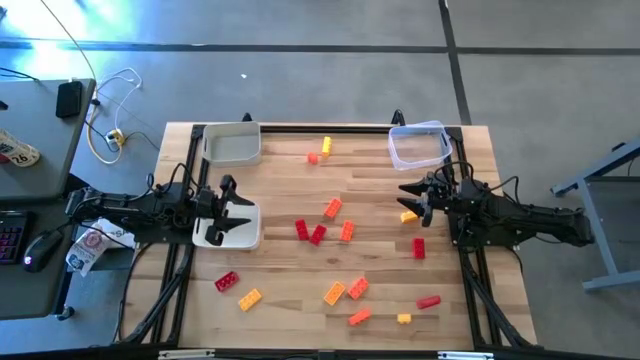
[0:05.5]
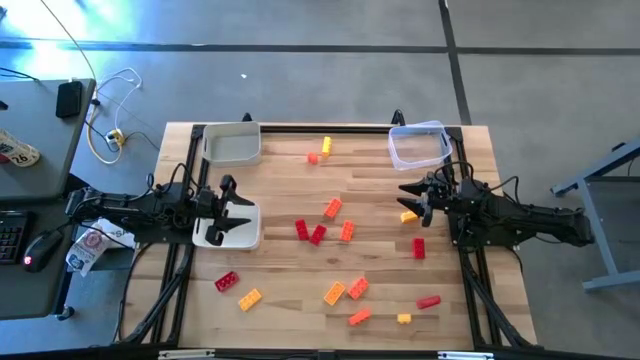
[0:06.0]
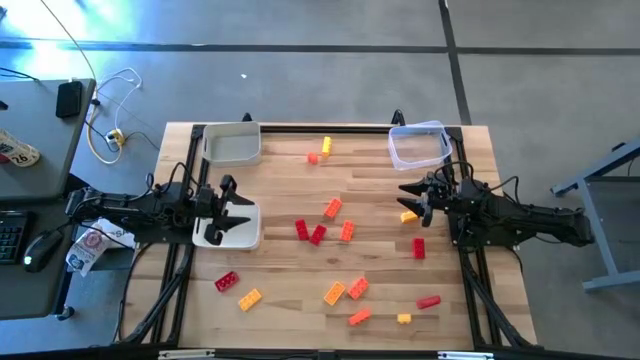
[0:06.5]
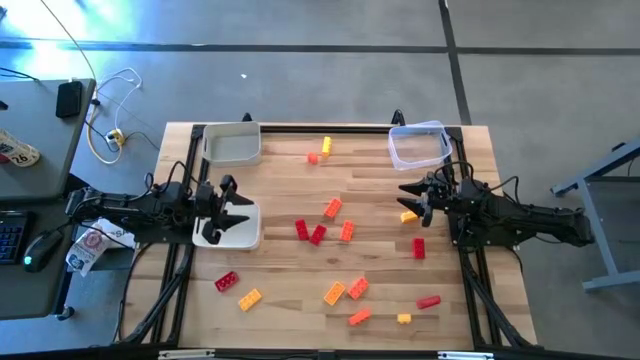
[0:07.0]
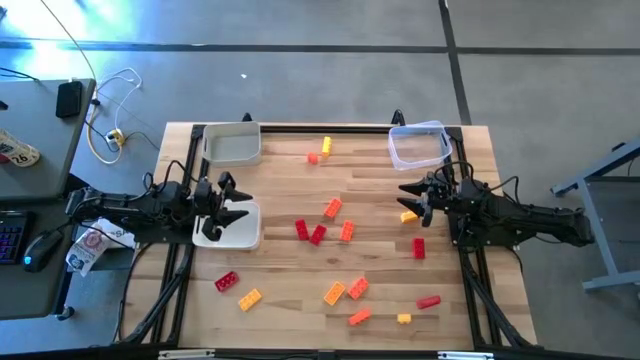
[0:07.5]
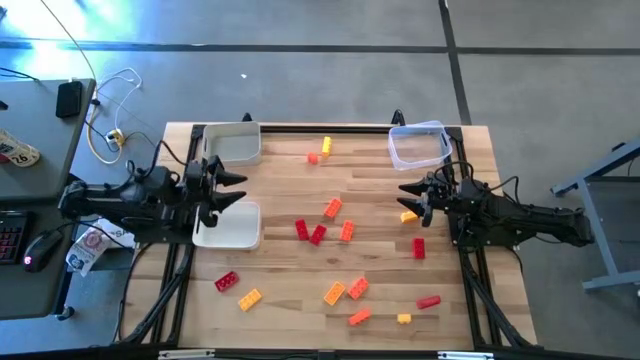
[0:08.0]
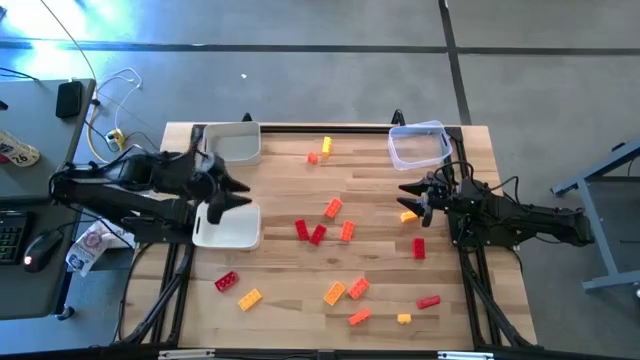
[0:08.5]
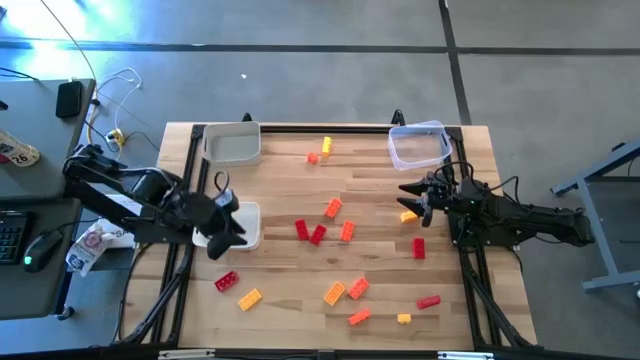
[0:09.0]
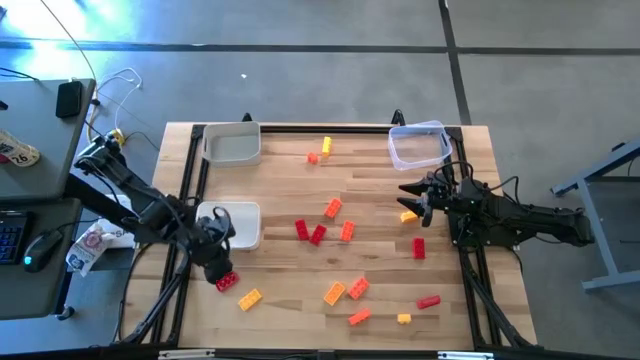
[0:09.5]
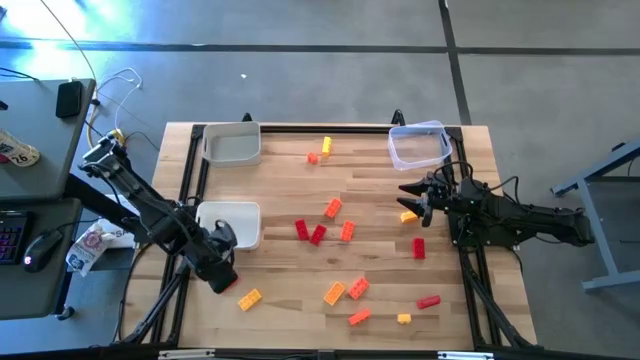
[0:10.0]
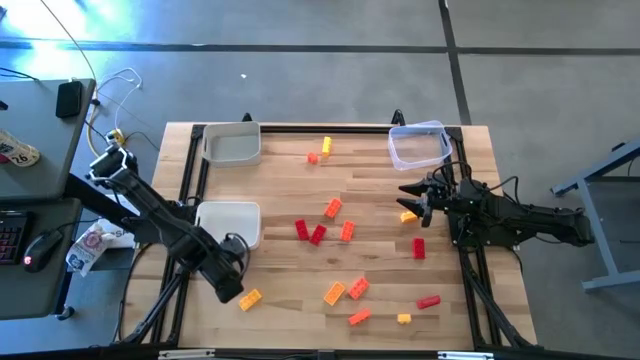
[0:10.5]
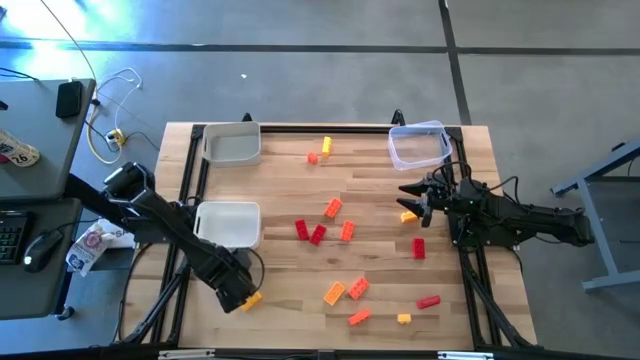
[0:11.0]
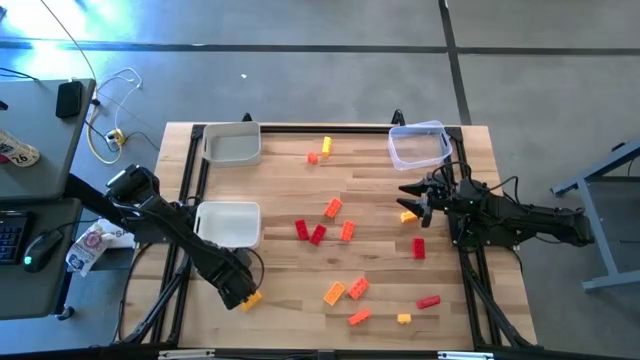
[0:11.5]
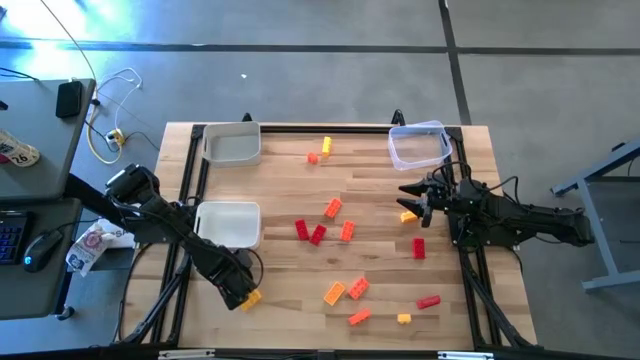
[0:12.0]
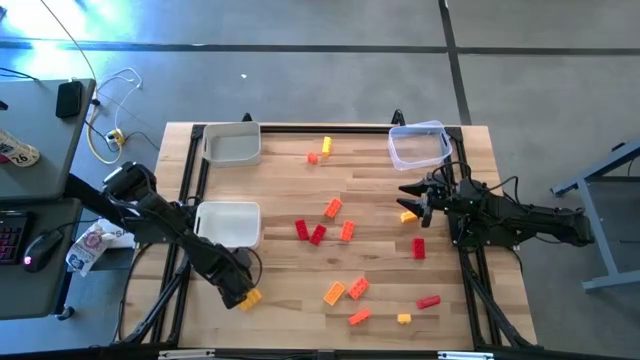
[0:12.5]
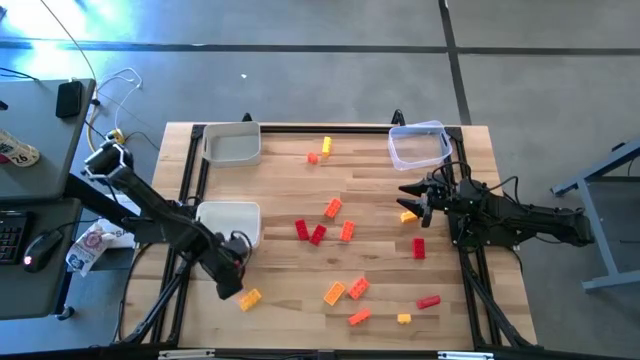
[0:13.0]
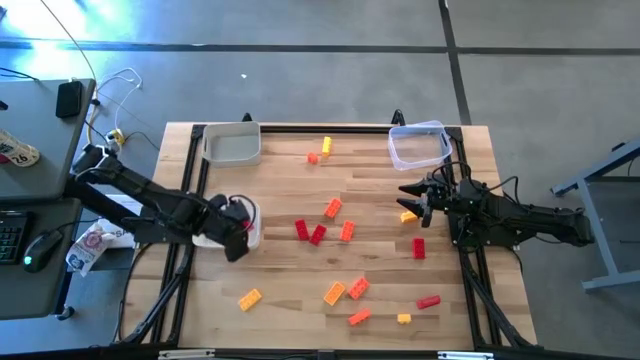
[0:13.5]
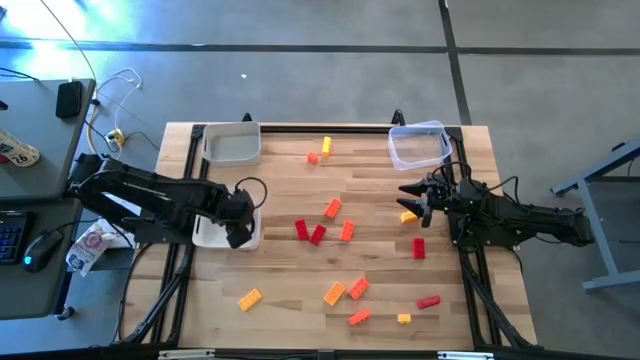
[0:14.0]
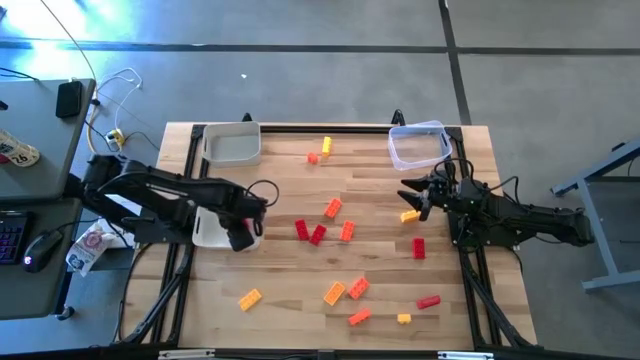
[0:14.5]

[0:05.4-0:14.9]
Task: Sort & place blocks by color
Put the red game piece into the white bin

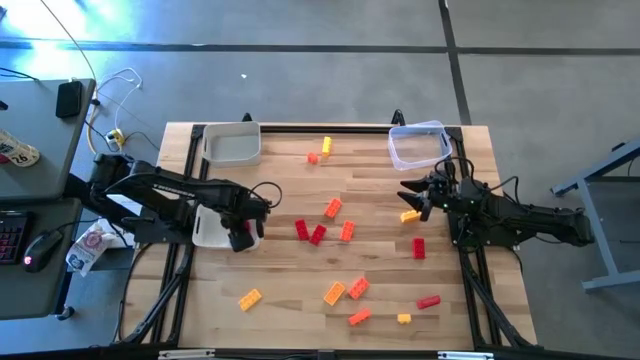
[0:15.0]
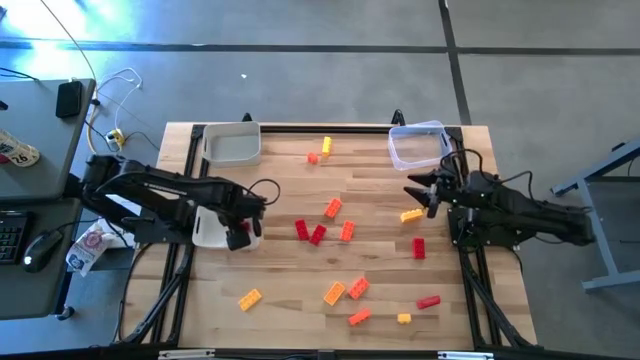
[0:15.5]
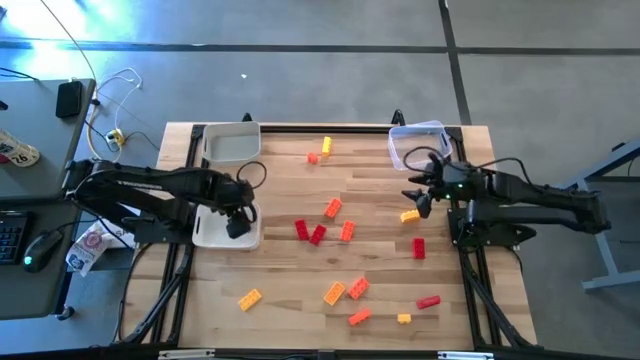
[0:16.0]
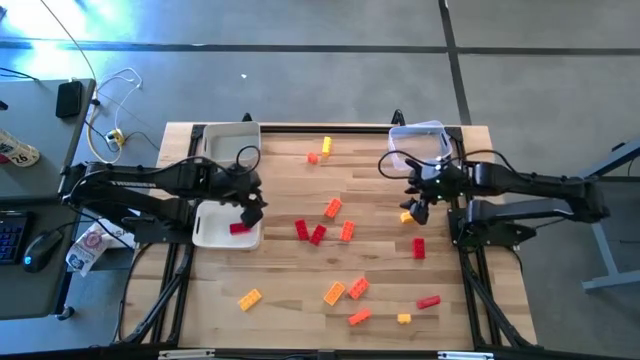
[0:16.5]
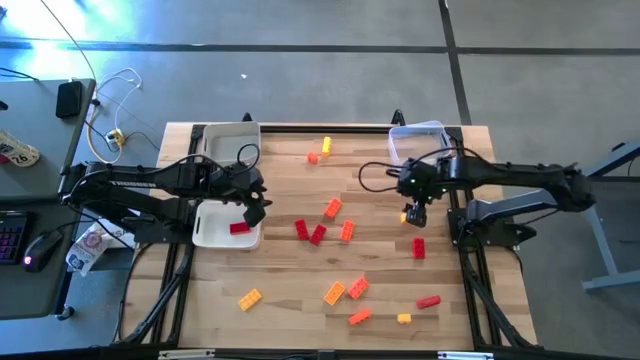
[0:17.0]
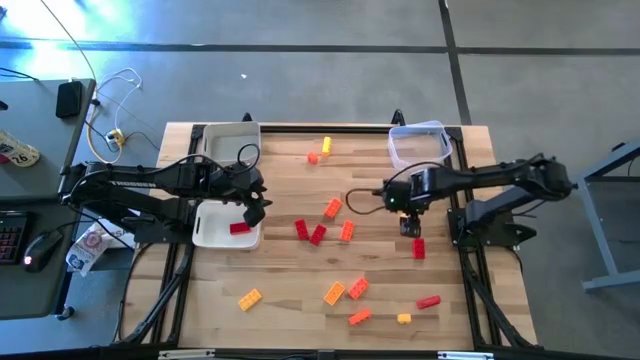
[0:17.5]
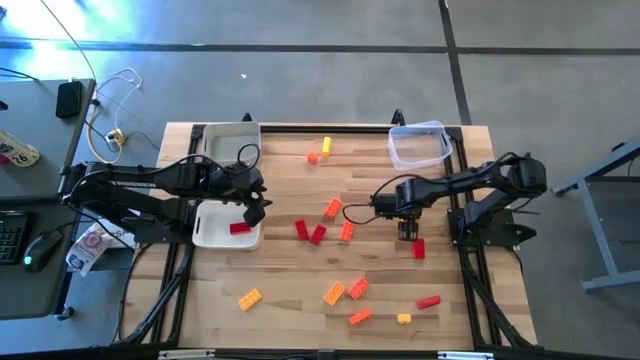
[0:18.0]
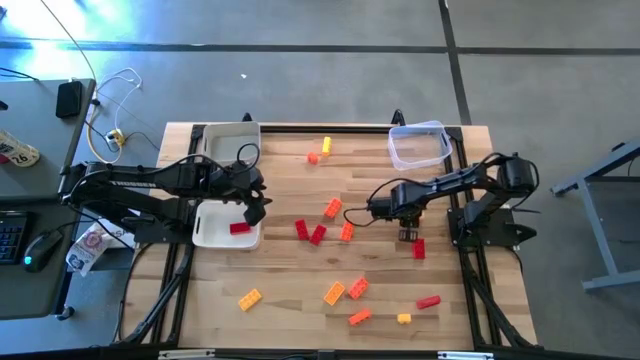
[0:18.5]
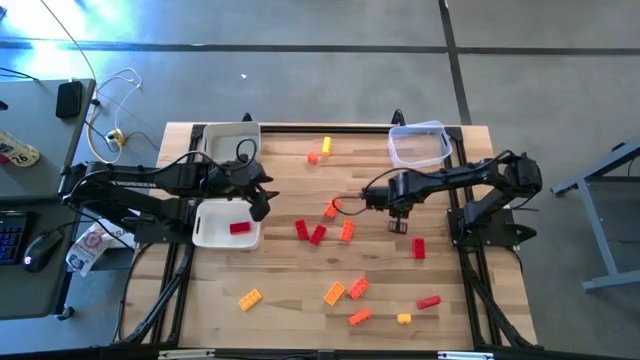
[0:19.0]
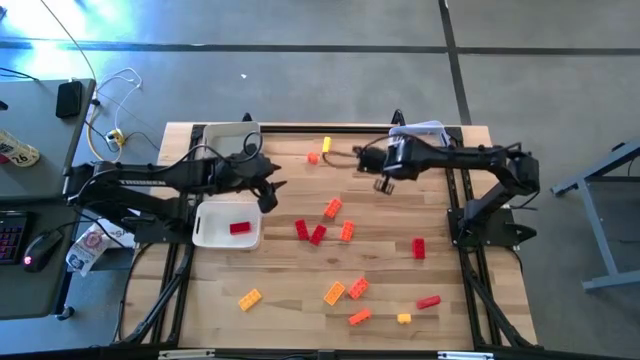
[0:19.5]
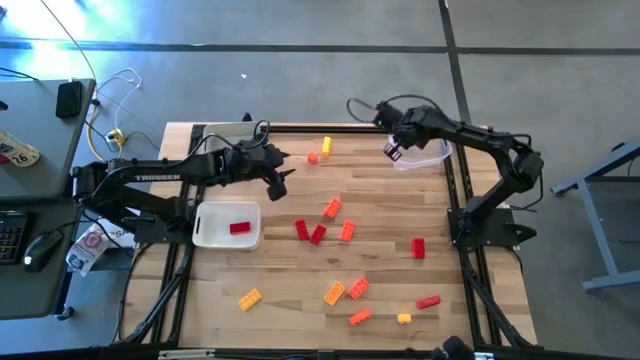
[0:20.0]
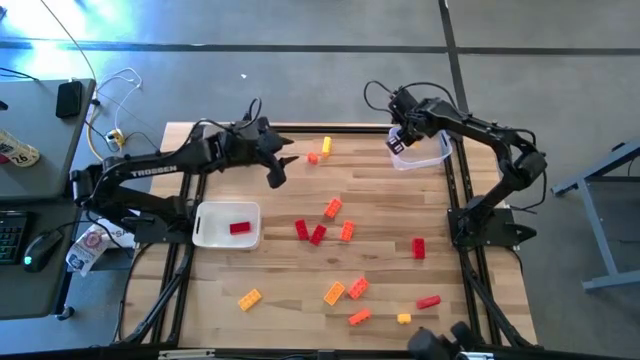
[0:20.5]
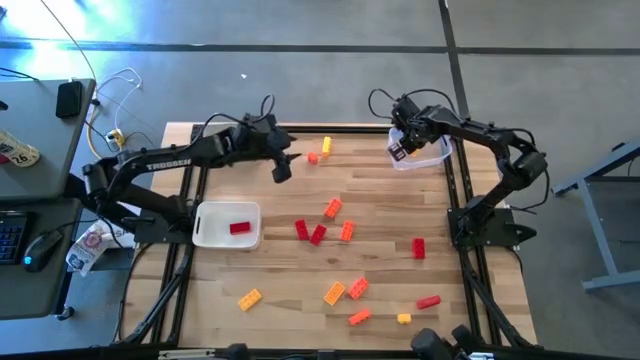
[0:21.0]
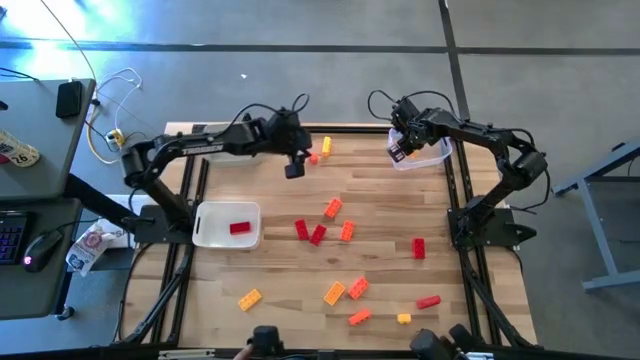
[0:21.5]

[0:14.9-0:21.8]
Put the yellow game piece into the transparent bin

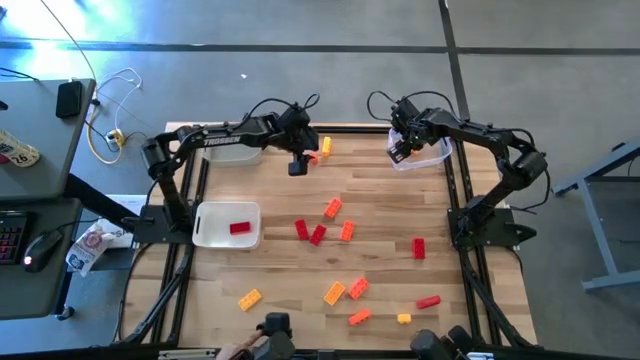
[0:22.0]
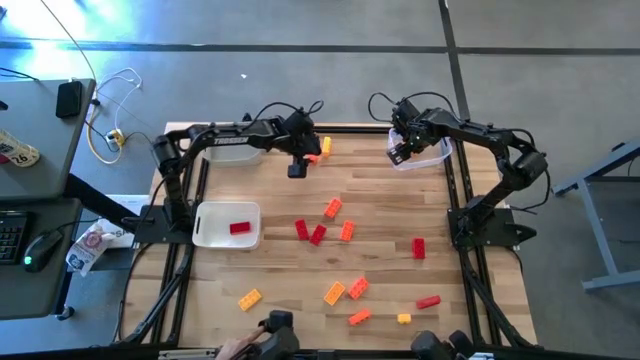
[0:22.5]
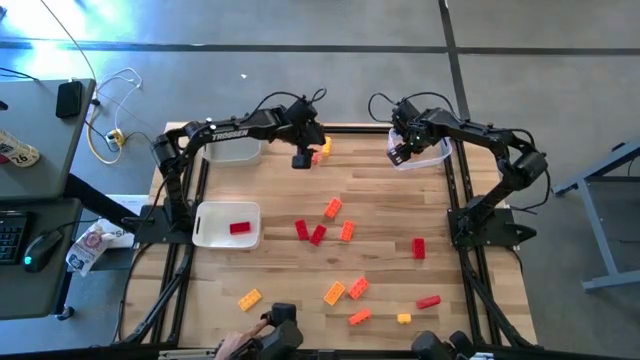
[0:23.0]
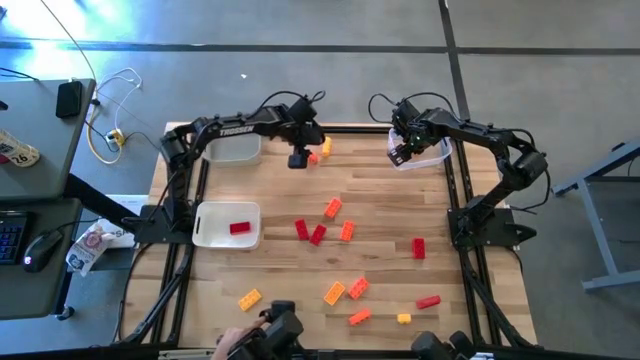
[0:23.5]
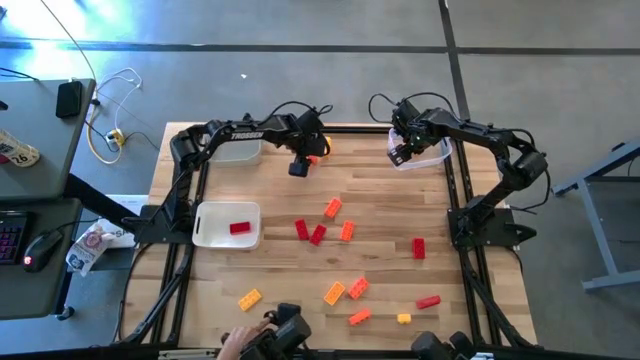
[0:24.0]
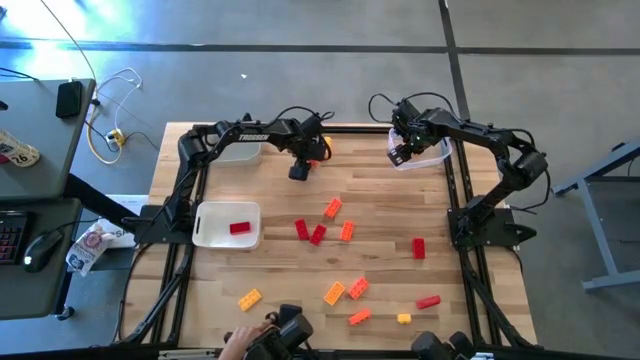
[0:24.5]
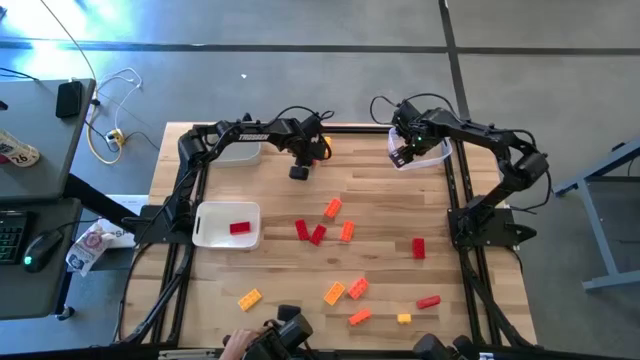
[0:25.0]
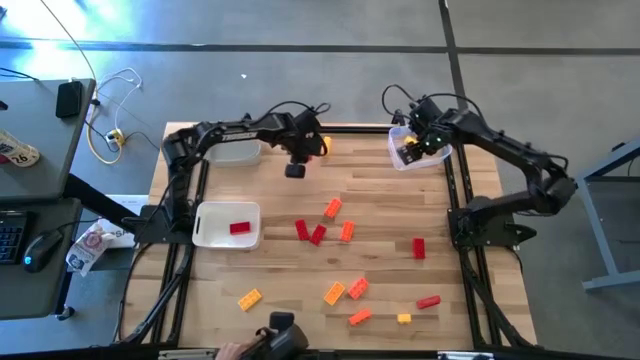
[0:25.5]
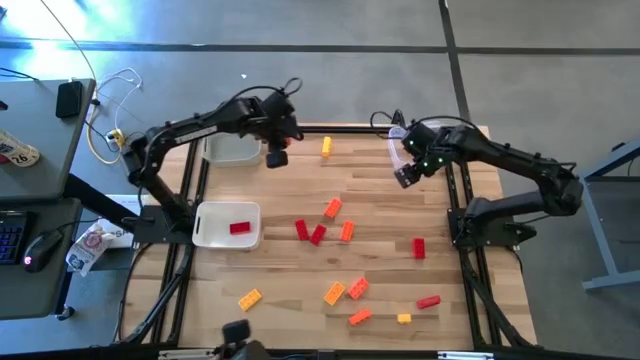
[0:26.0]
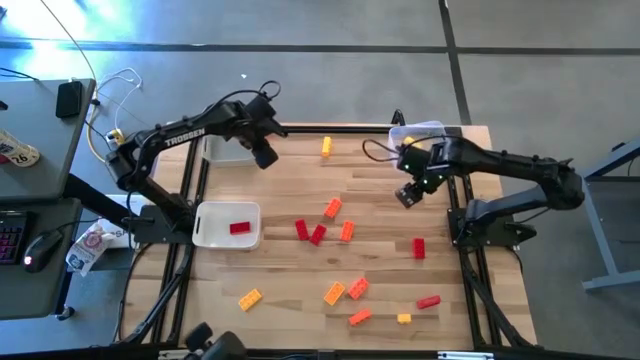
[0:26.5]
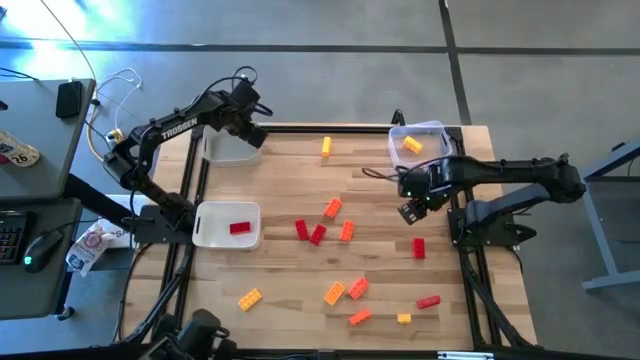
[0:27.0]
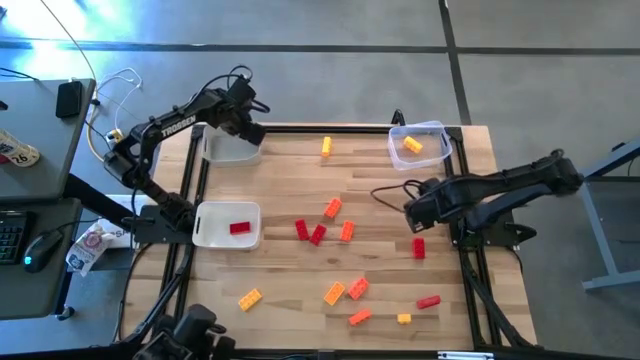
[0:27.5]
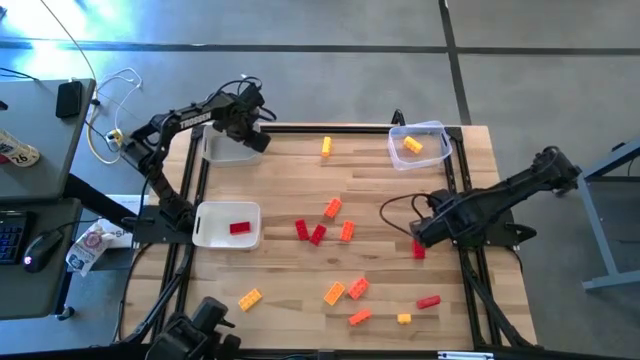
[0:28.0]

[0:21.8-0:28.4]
Put the orange game piece into the gray bin
